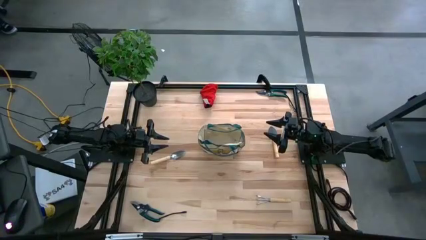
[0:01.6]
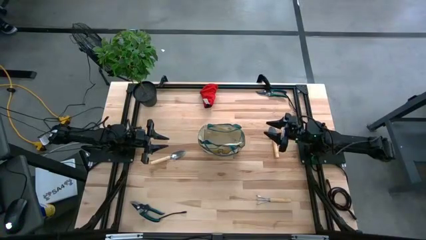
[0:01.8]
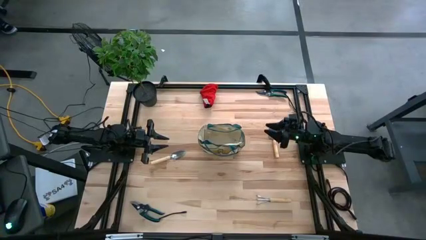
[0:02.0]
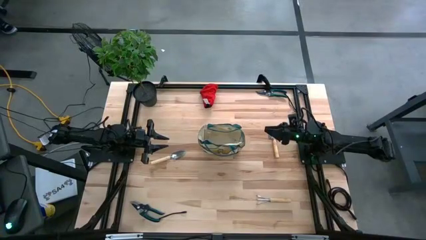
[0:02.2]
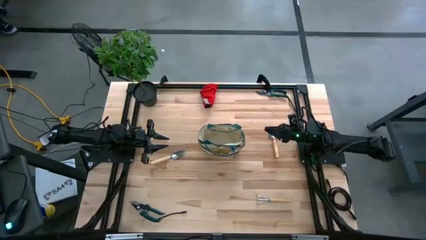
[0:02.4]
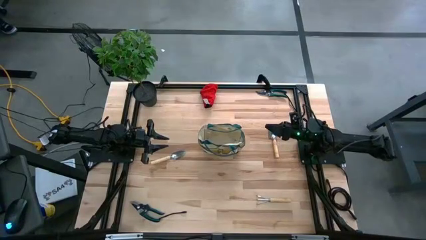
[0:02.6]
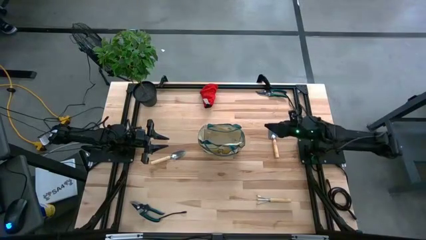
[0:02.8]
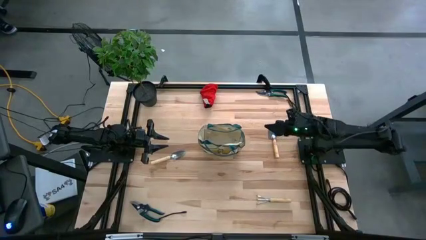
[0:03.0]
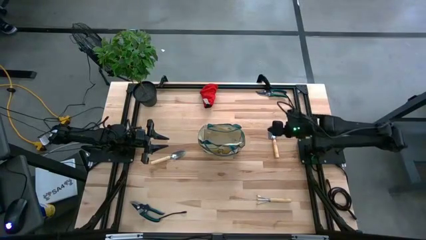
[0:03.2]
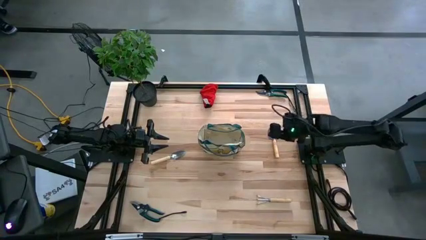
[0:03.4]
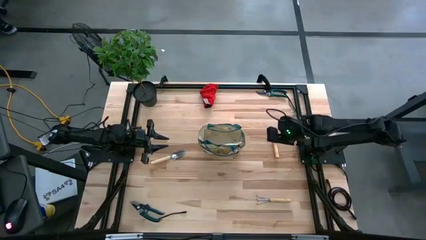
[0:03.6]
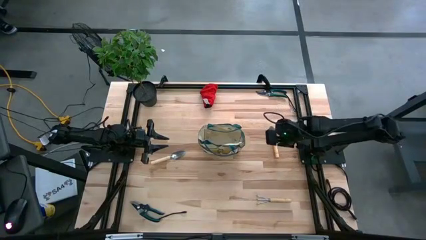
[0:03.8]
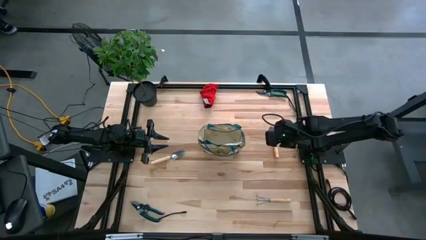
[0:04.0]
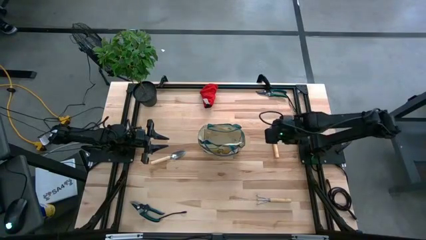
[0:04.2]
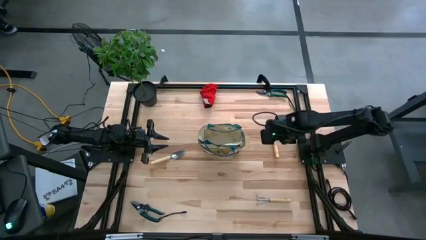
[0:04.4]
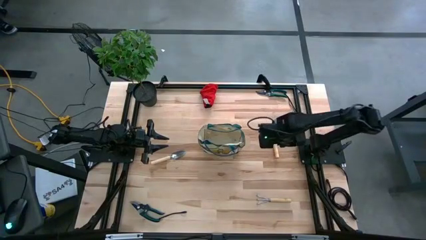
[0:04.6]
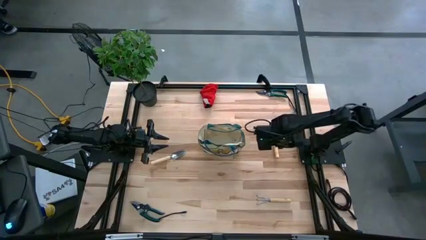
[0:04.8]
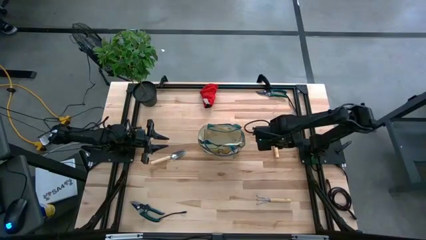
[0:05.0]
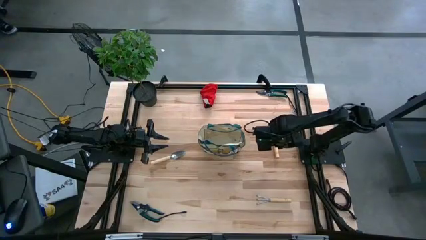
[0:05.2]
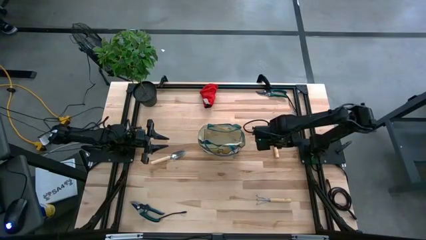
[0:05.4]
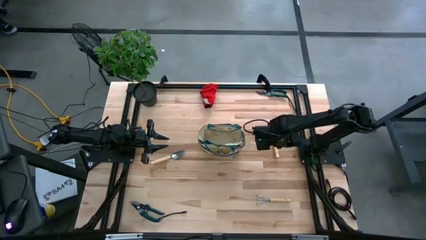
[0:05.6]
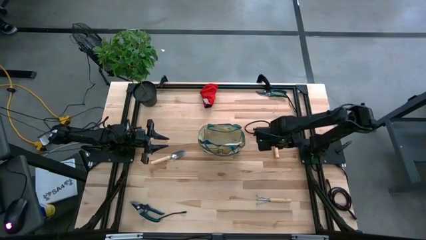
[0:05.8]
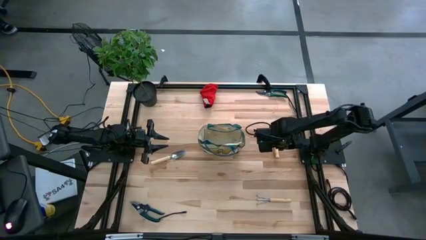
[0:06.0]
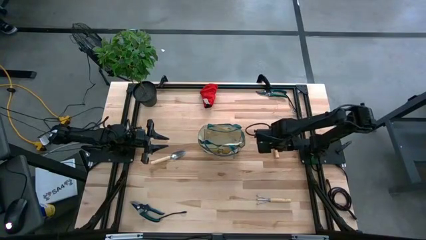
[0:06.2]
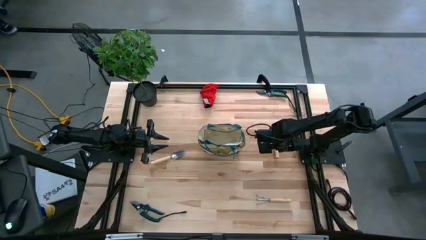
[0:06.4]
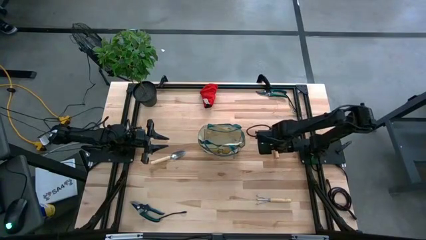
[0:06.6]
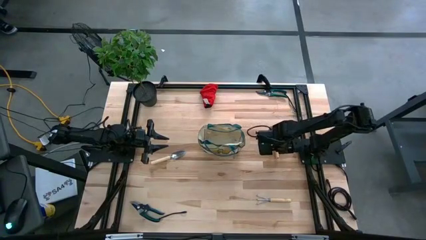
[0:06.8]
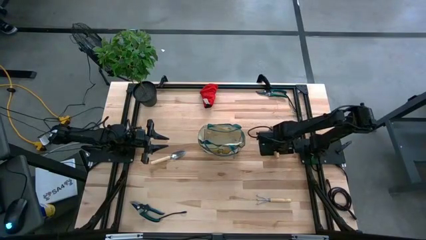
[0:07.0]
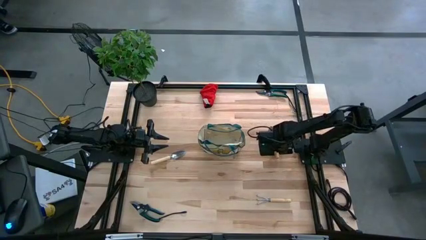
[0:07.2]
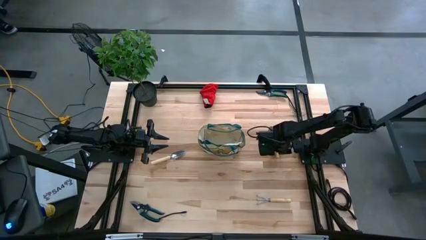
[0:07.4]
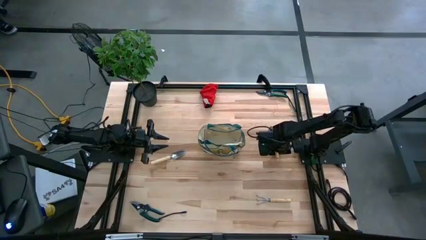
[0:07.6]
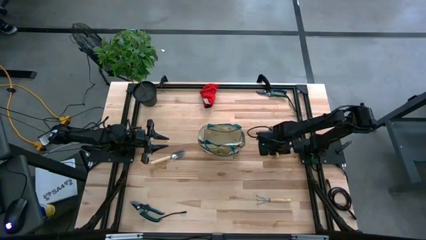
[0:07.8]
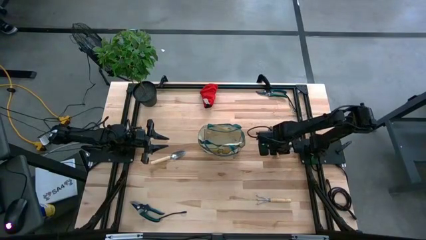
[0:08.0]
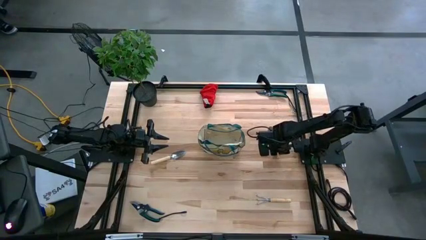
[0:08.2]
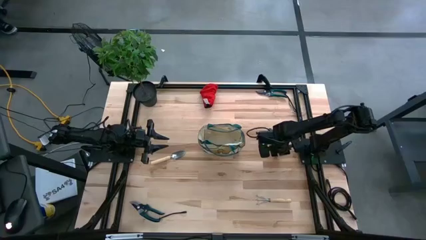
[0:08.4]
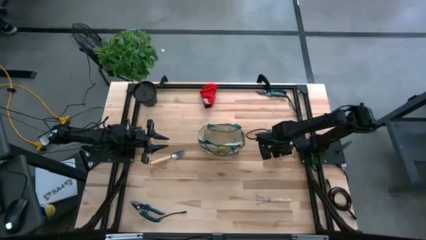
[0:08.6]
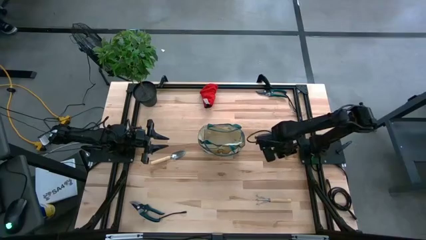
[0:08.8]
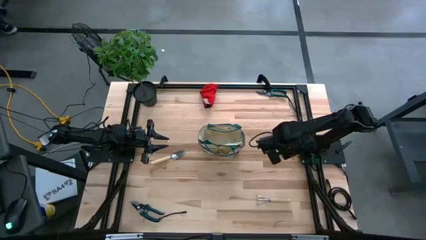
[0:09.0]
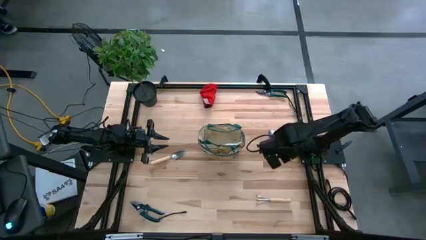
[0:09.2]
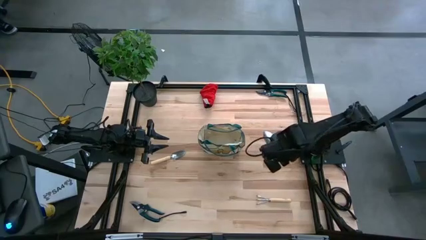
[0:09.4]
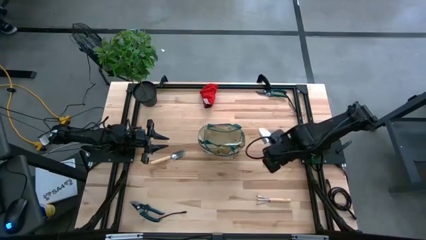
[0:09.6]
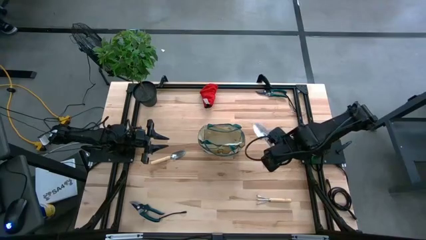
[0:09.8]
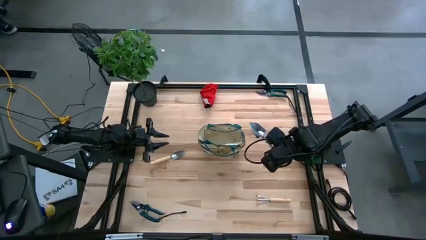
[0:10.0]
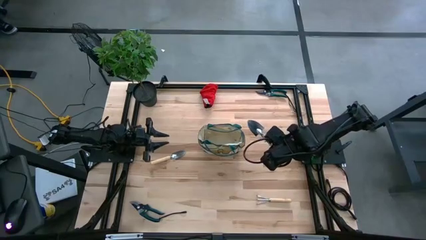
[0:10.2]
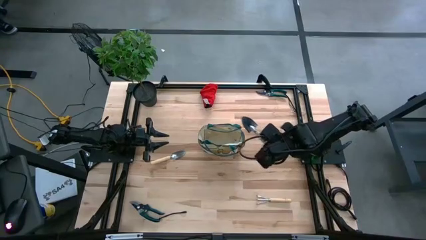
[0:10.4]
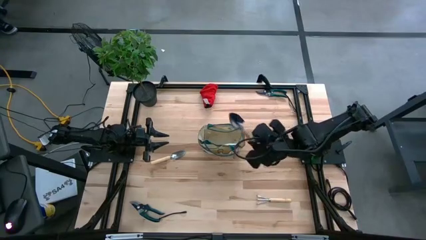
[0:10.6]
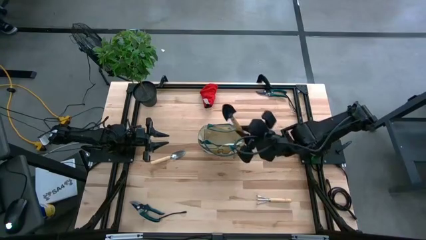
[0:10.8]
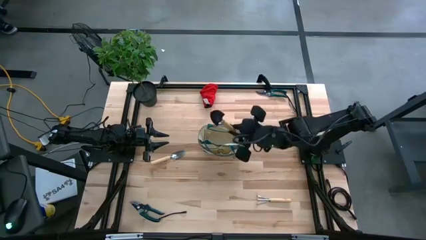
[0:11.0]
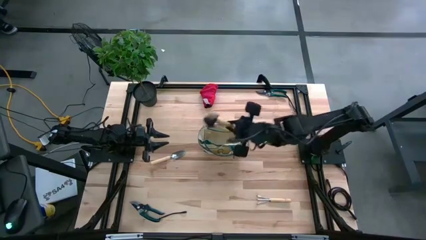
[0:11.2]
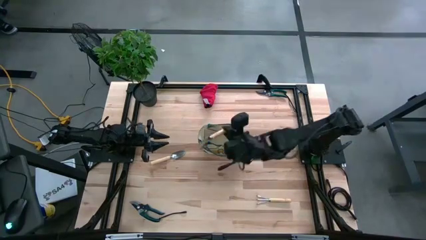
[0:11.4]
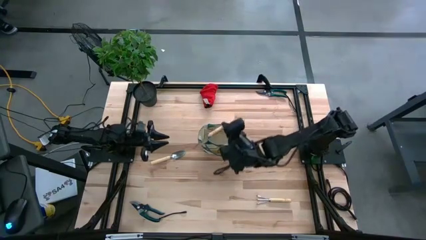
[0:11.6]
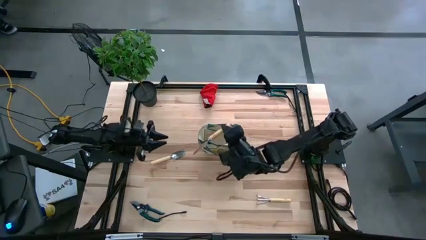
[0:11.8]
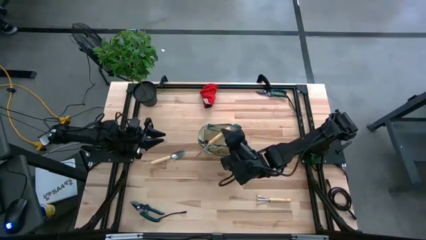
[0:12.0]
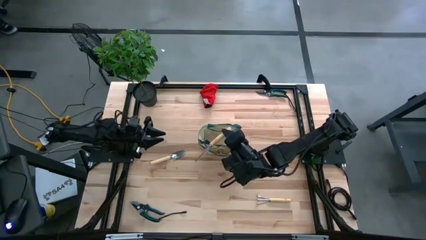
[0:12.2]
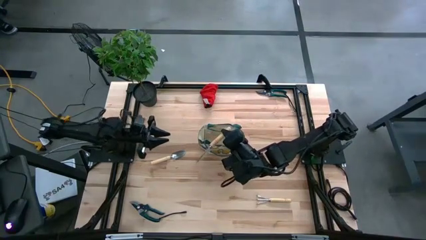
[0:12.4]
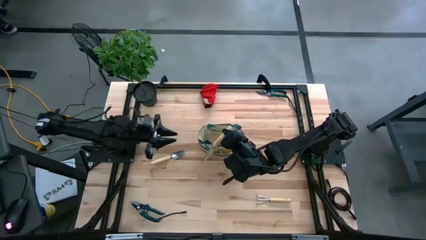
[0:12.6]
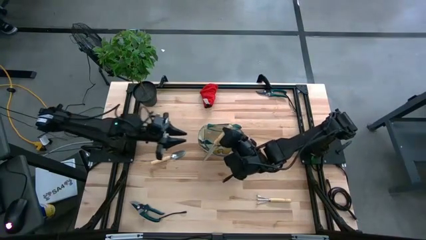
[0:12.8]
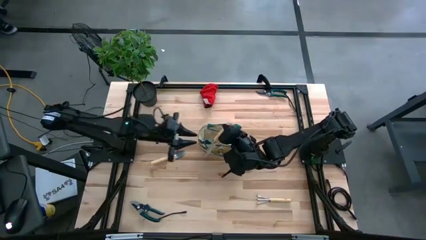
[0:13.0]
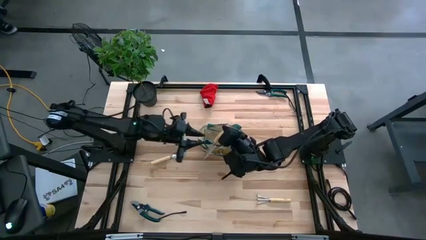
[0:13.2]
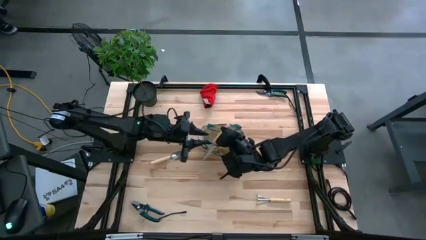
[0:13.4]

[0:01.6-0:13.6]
Task: Pick & Place Garden tools in Gardening bag
Put the right trowel into the gardening bag
